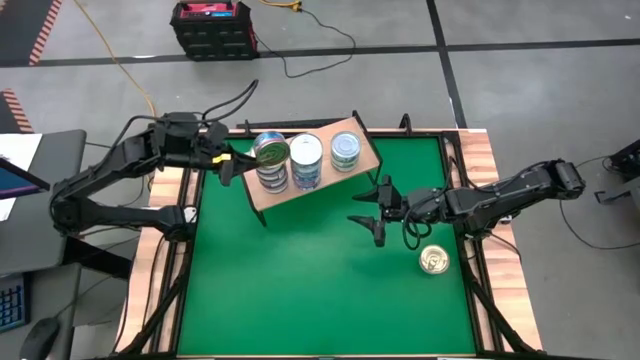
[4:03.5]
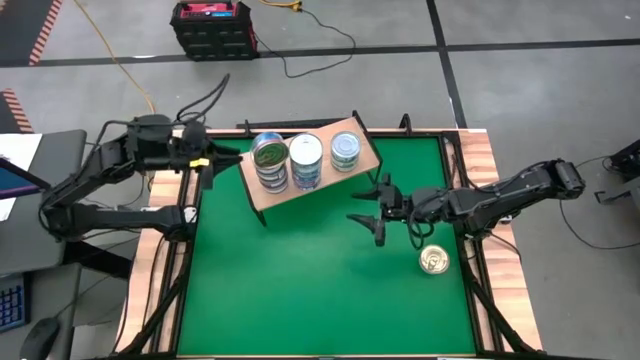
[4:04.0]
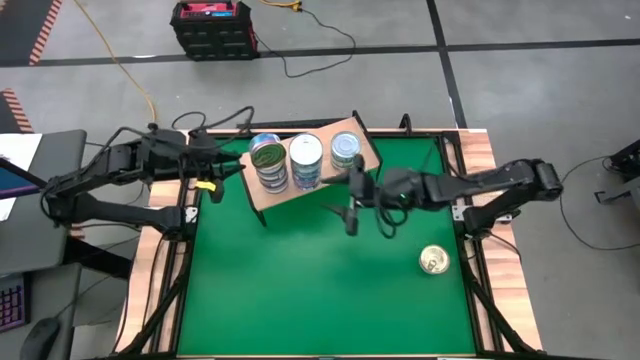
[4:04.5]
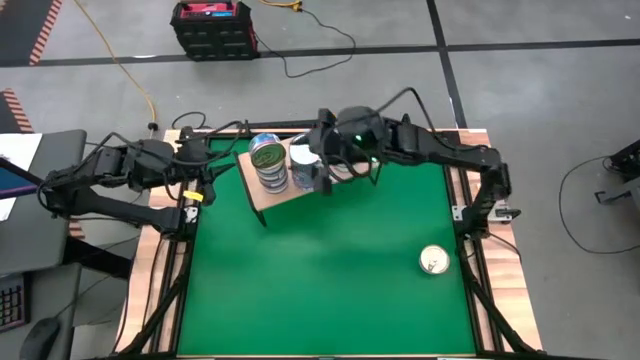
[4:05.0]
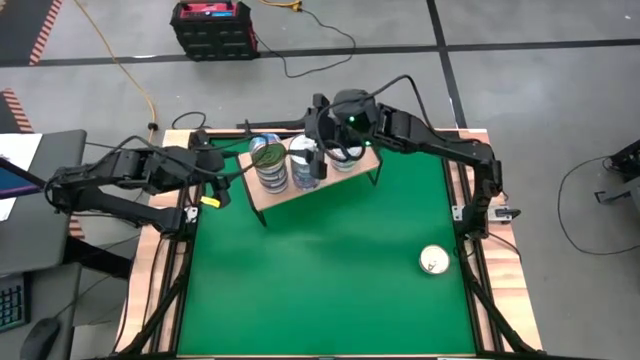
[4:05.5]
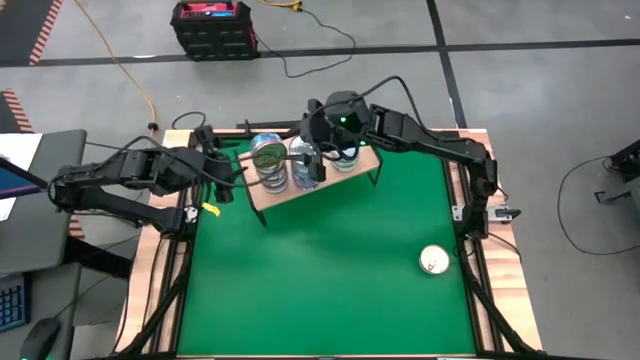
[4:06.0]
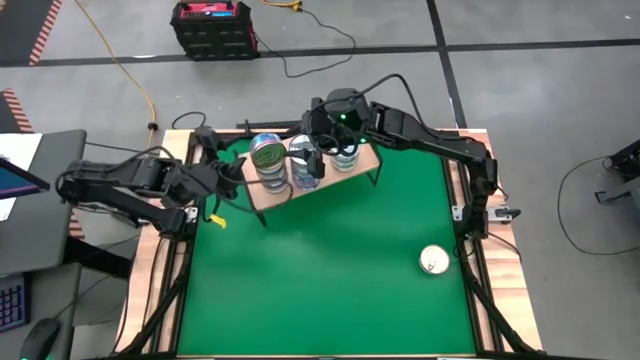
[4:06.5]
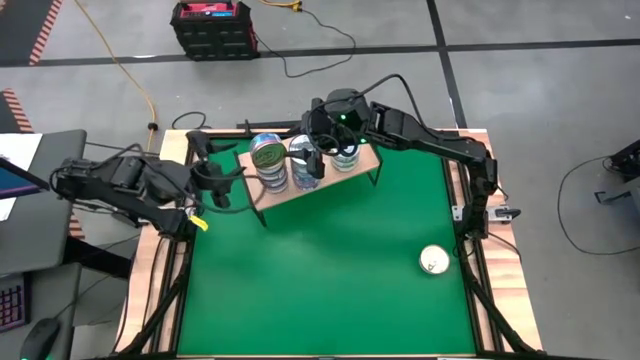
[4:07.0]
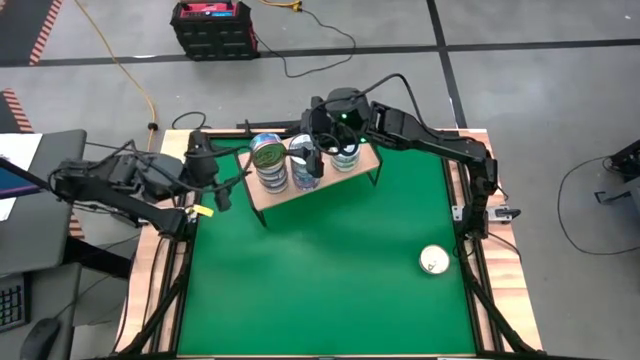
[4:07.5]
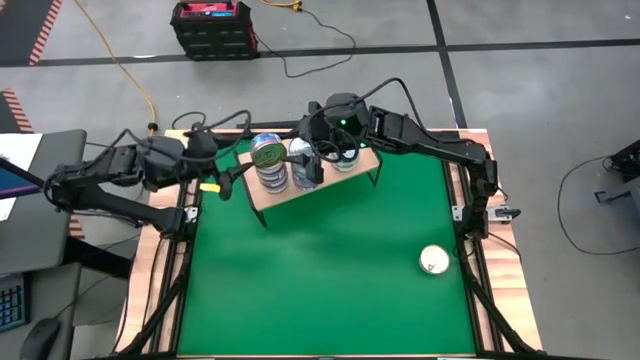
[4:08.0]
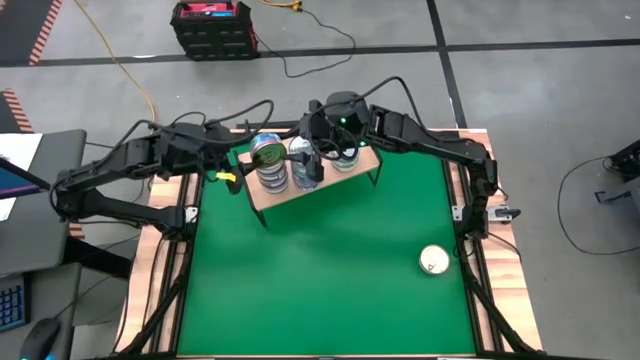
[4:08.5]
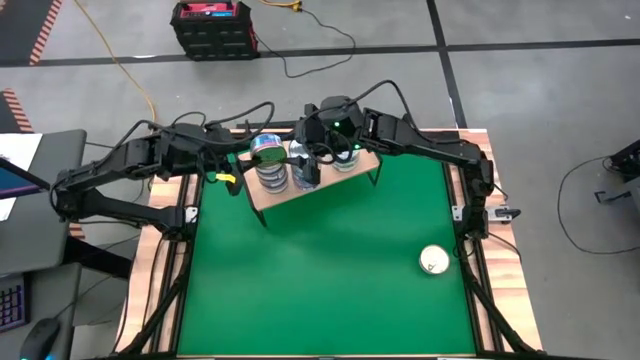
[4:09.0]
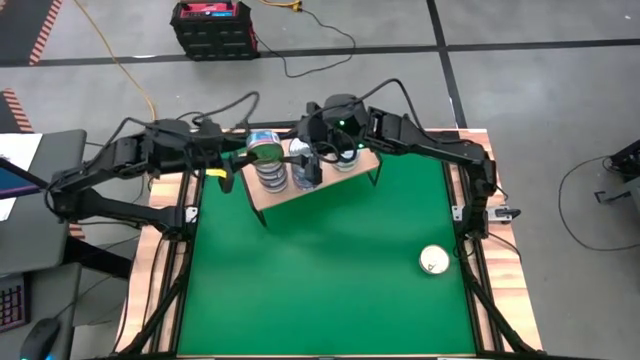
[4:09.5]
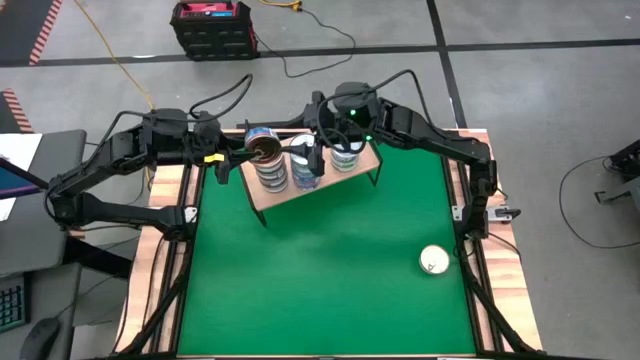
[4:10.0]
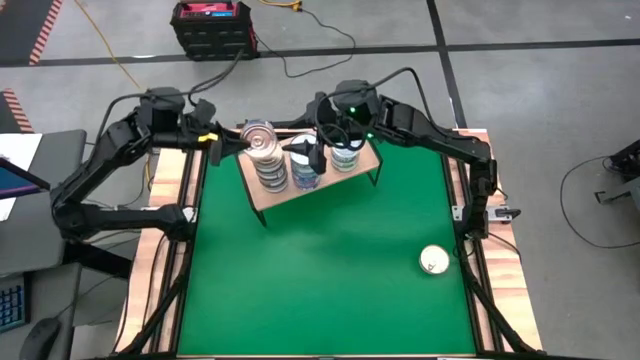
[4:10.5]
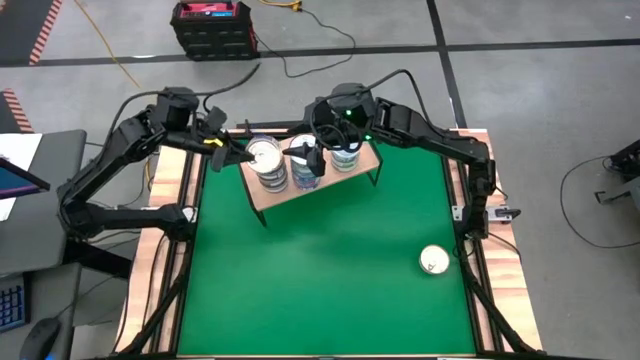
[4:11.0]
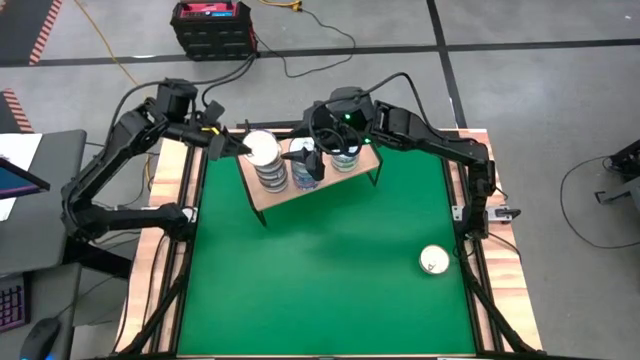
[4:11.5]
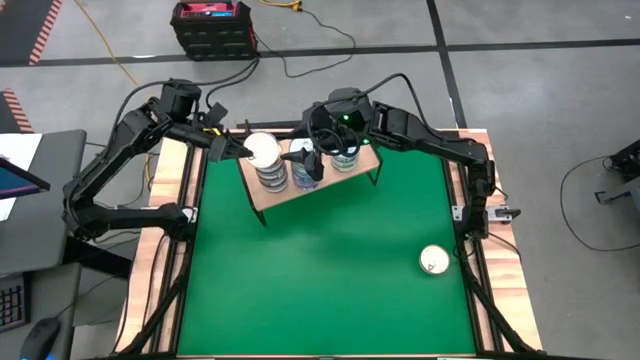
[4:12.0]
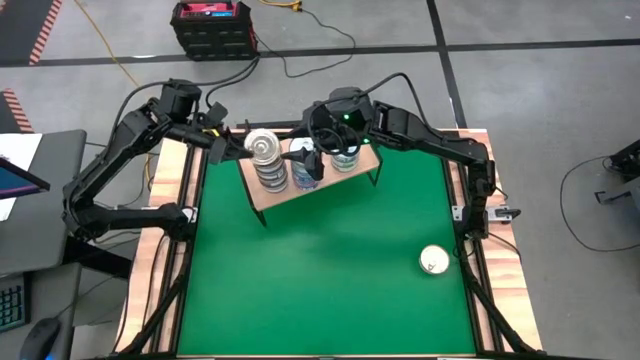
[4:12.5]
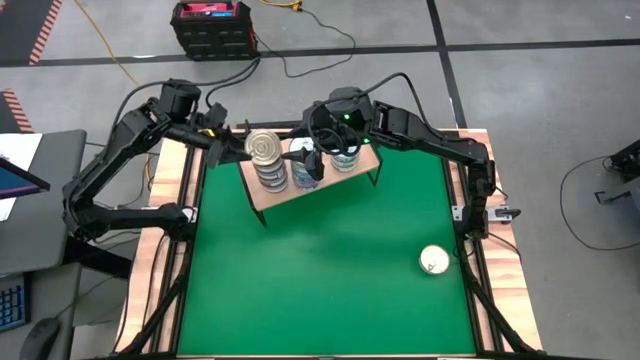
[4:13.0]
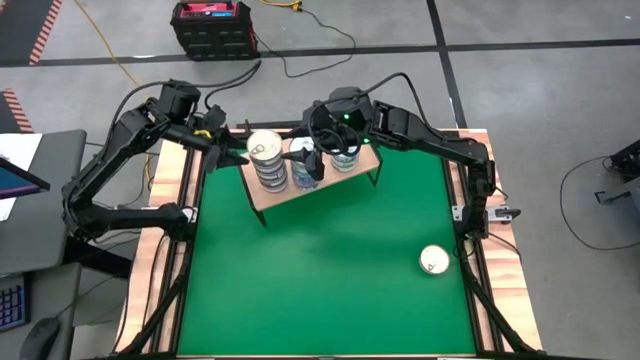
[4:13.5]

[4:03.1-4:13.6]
Task: Stack canned seafood by type on shelf
Stack the blue pink tuna can on top of the blue pink tuna can on the shelf

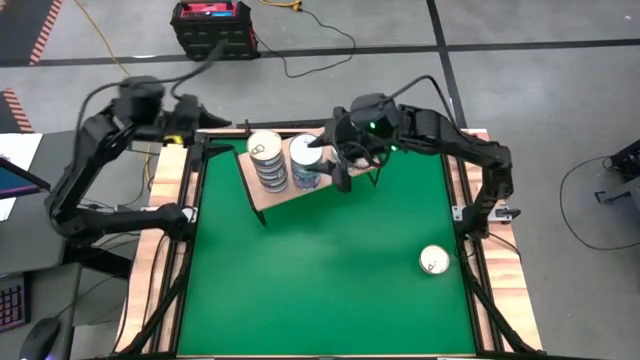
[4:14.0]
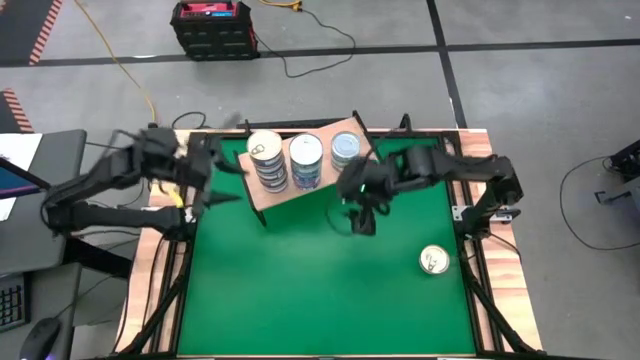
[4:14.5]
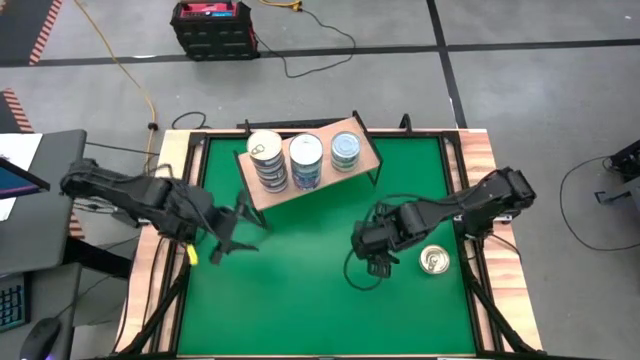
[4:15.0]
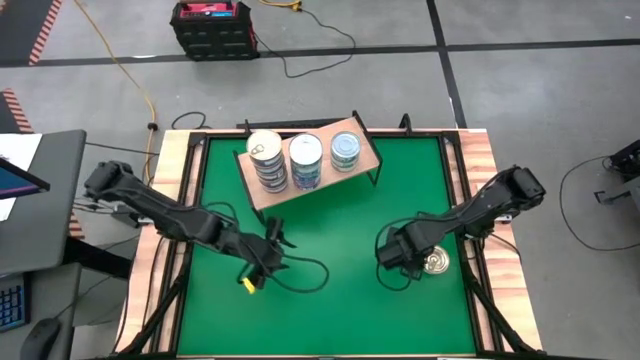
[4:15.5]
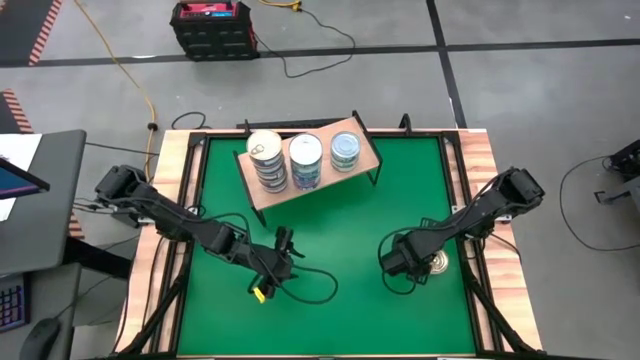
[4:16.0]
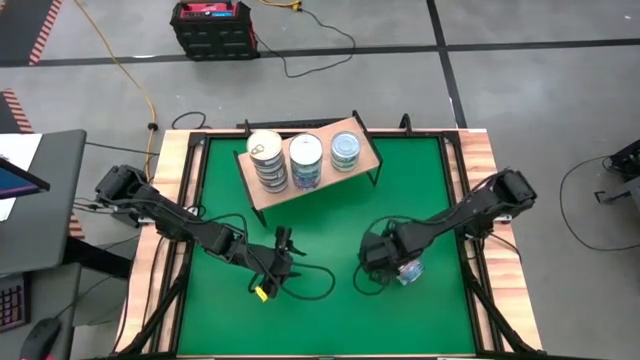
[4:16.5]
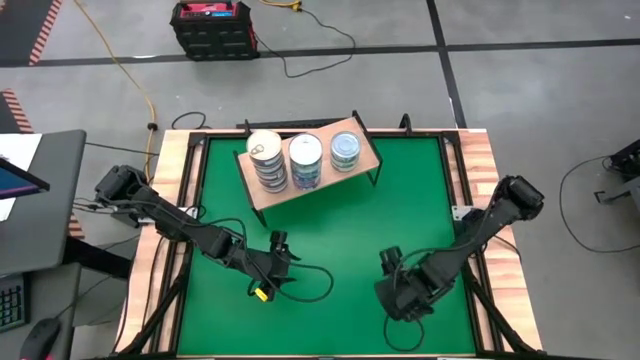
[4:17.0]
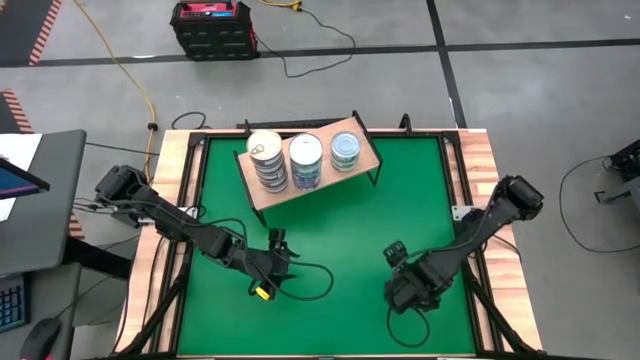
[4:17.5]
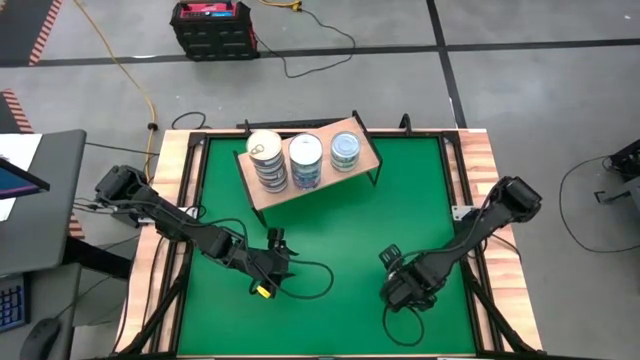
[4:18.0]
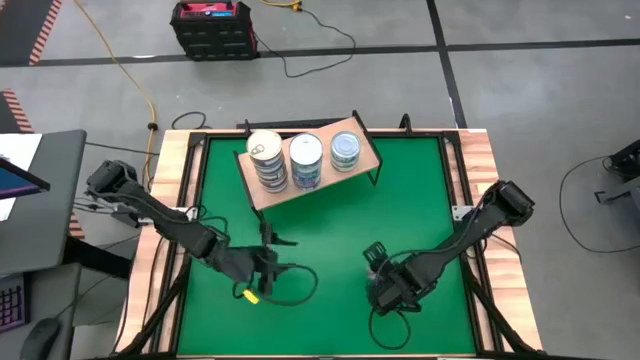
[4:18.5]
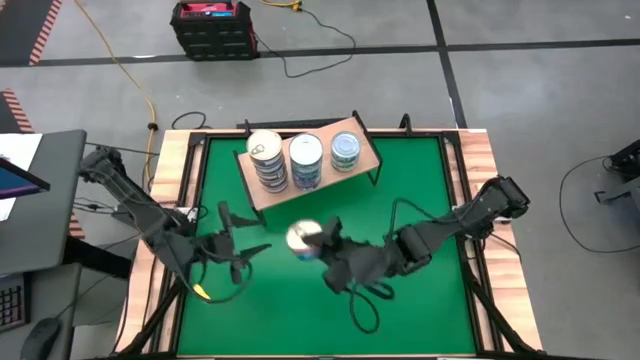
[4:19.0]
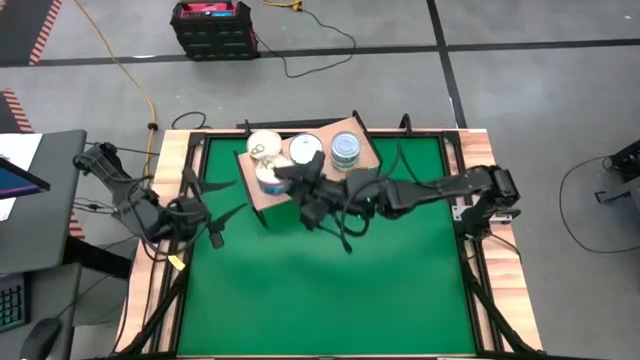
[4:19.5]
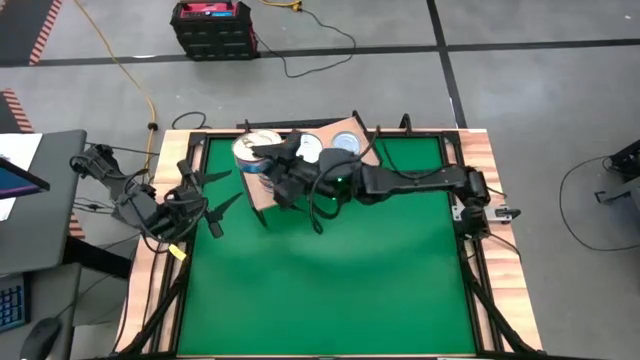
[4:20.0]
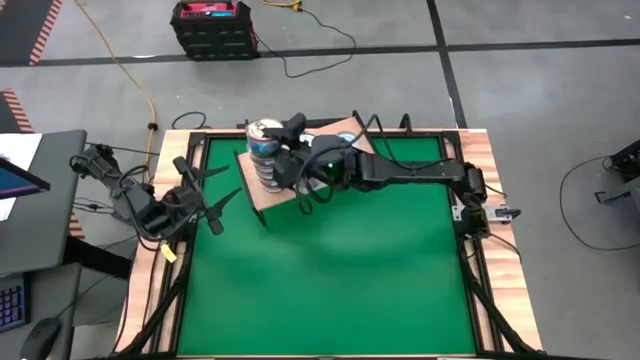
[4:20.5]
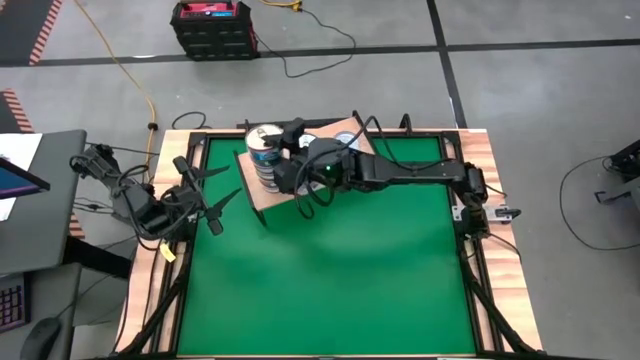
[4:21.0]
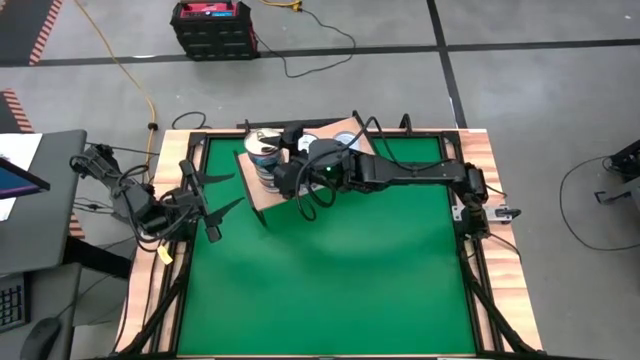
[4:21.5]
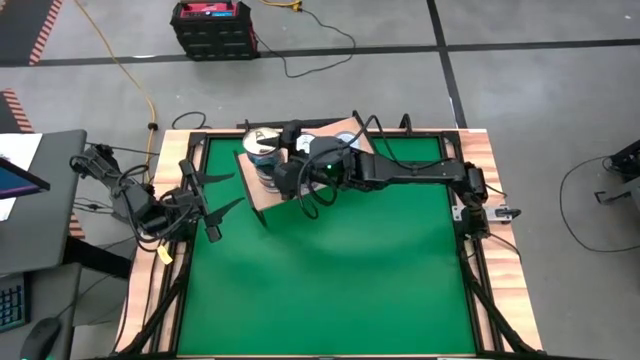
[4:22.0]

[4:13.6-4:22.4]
Stack the blue pink tuna can on top of the blue pink tuna can on the shelf

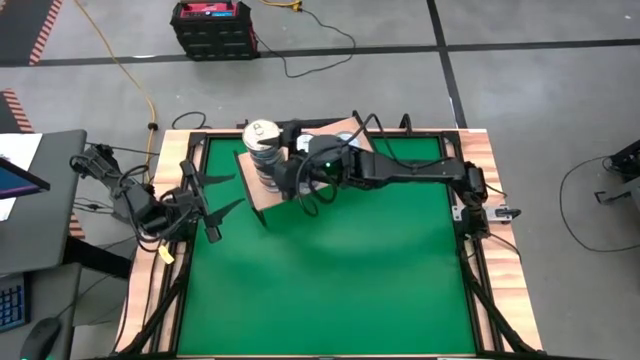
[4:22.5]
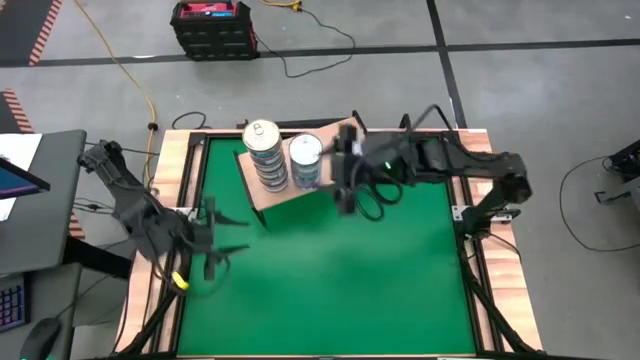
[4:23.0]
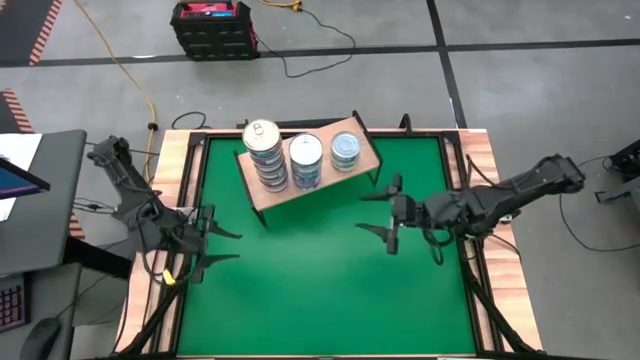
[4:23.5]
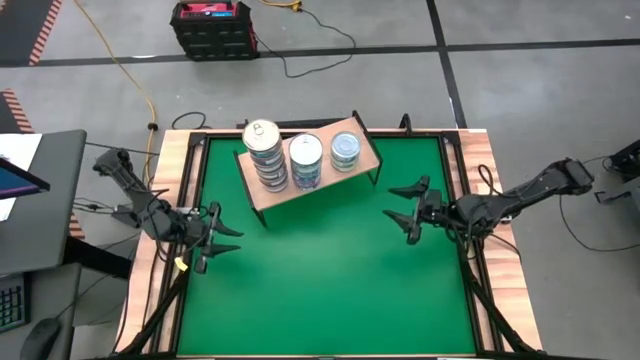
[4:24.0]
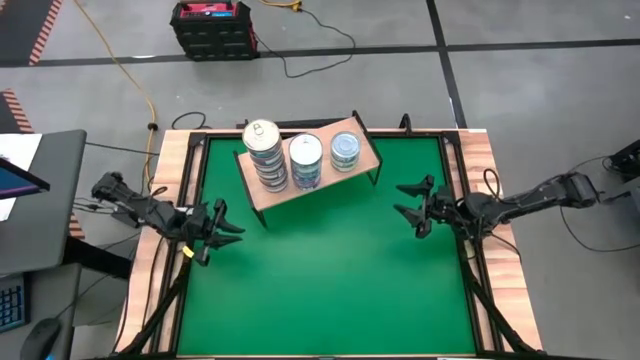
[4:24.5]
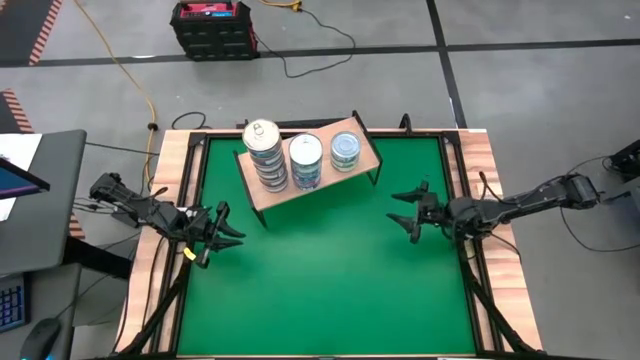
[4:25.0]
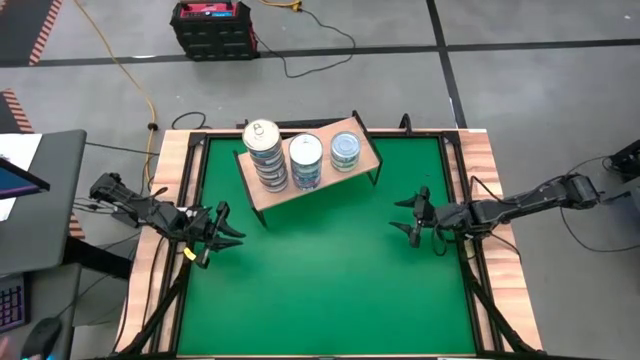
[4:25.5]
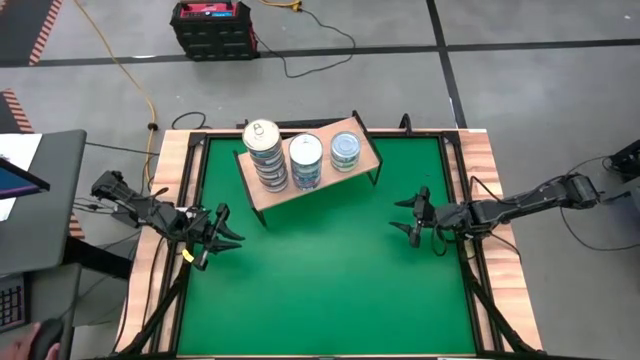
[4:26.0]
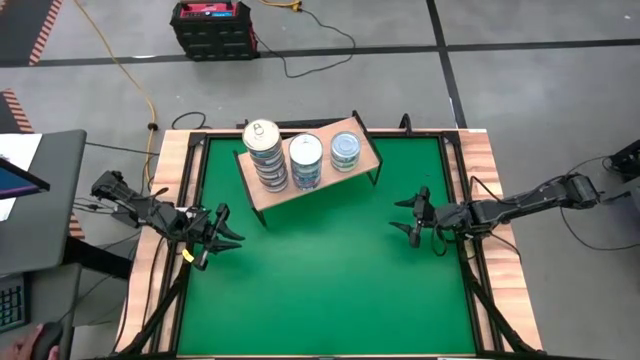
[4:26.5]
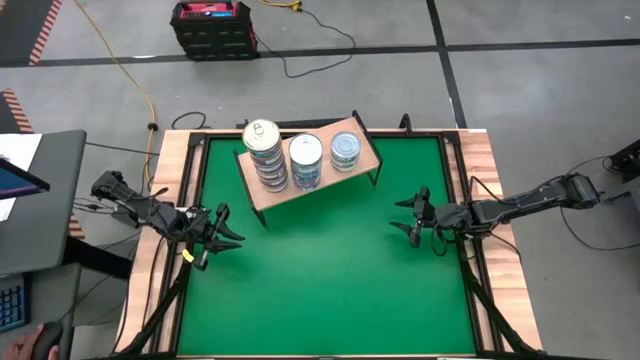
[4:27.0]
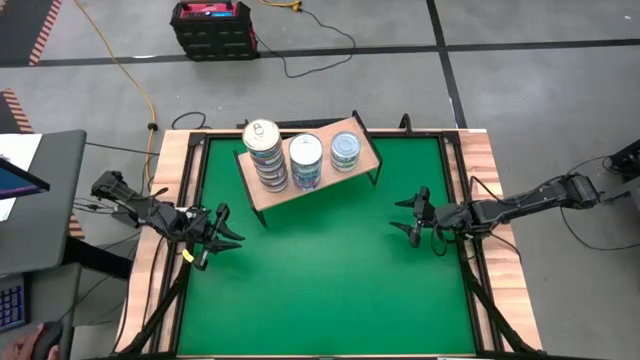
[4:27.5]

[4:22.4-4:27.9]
Return to Home Position
